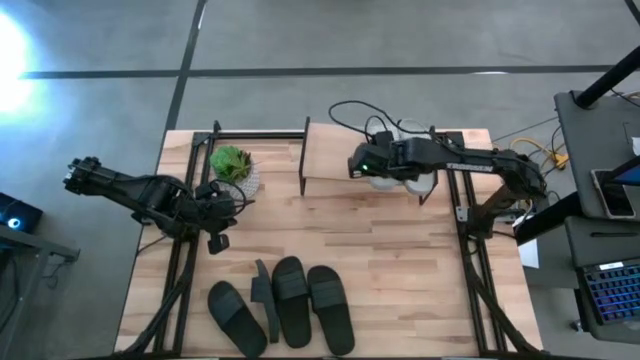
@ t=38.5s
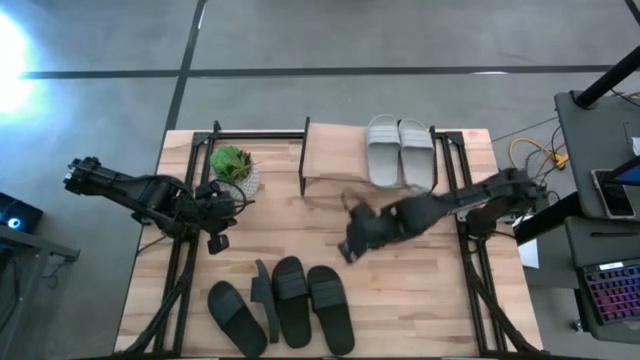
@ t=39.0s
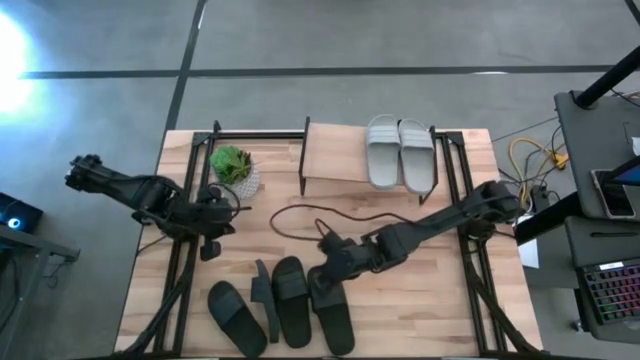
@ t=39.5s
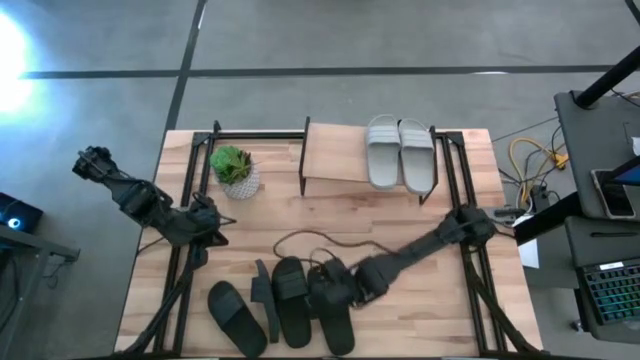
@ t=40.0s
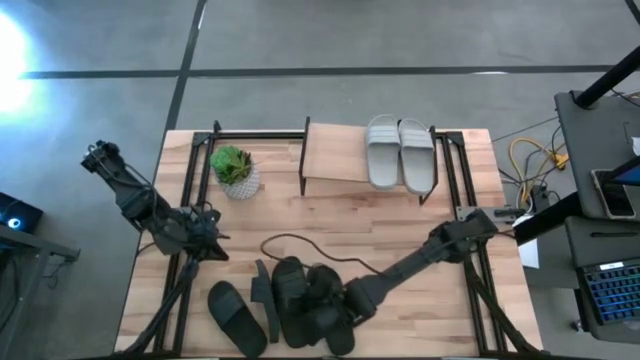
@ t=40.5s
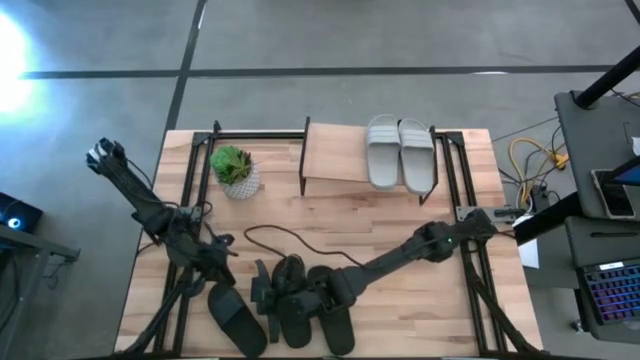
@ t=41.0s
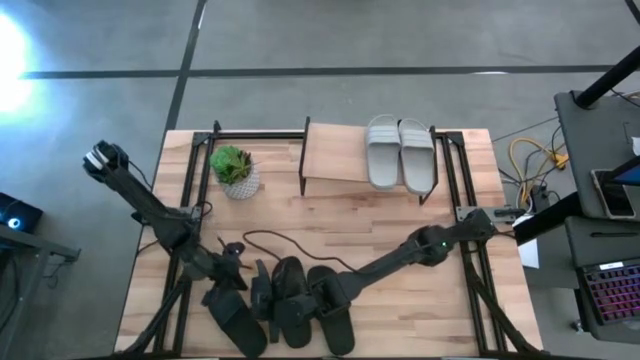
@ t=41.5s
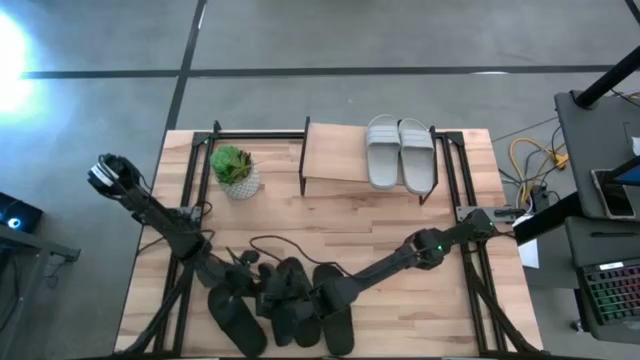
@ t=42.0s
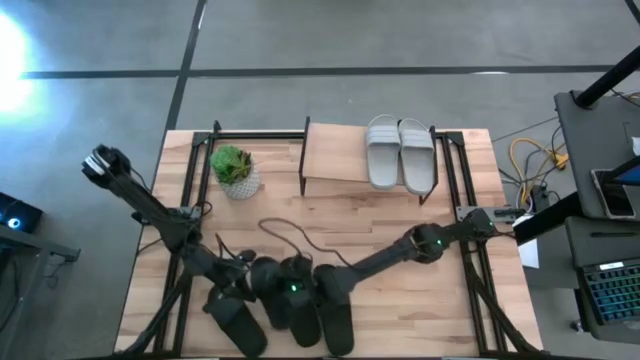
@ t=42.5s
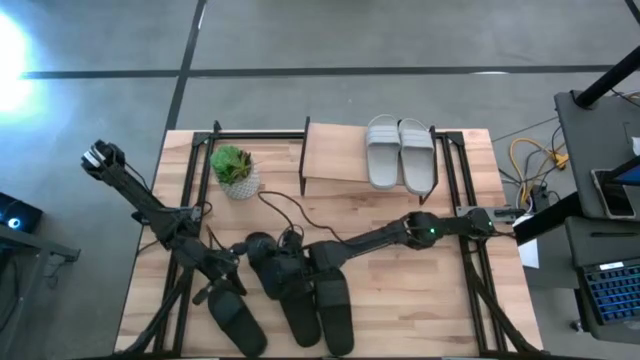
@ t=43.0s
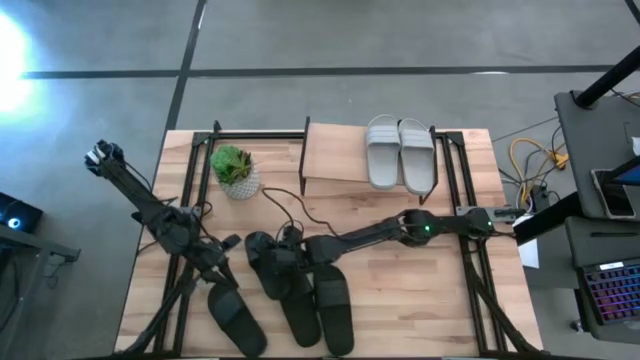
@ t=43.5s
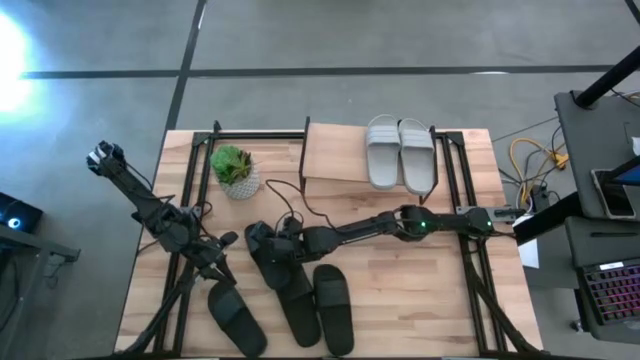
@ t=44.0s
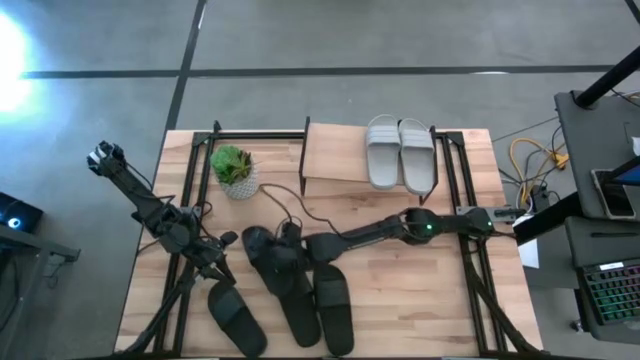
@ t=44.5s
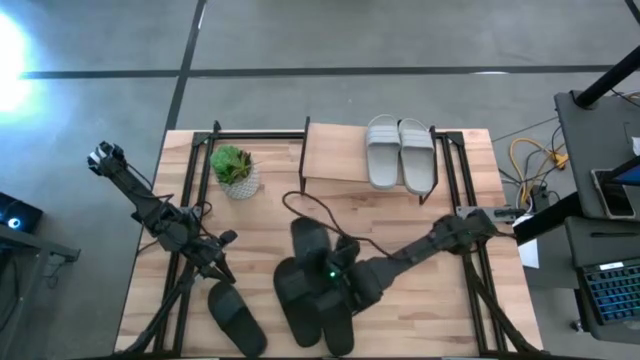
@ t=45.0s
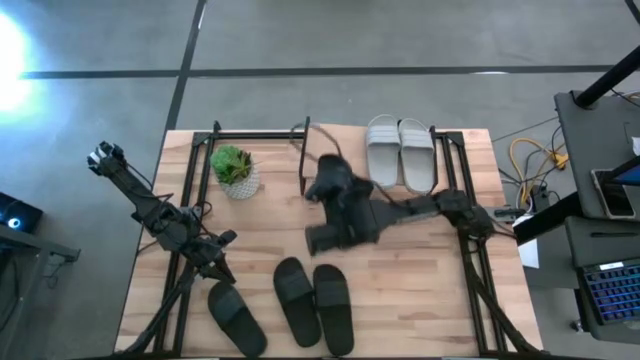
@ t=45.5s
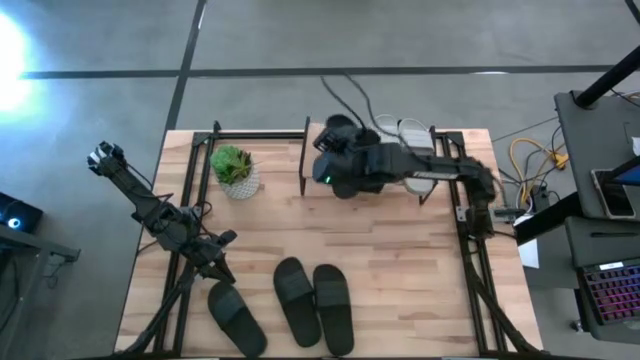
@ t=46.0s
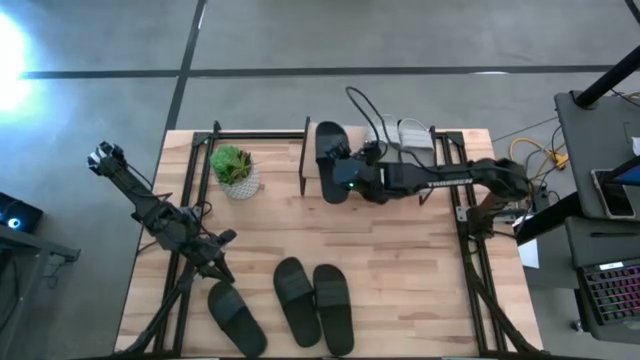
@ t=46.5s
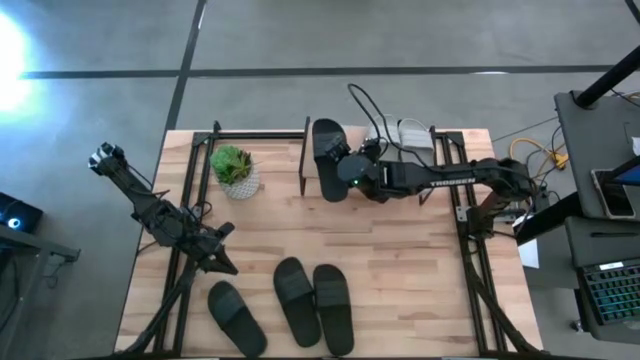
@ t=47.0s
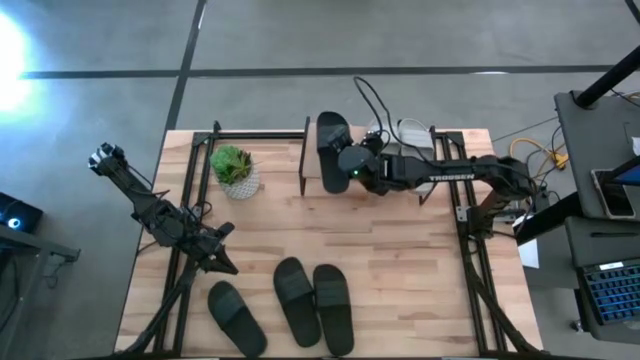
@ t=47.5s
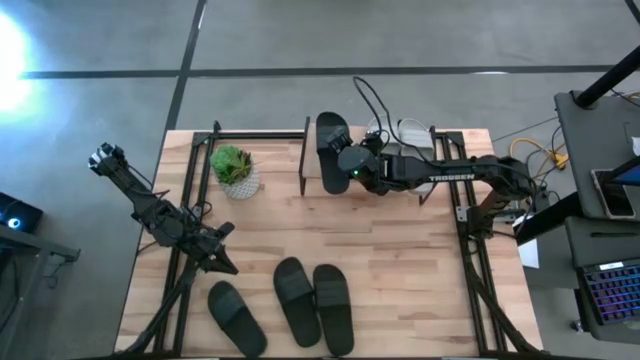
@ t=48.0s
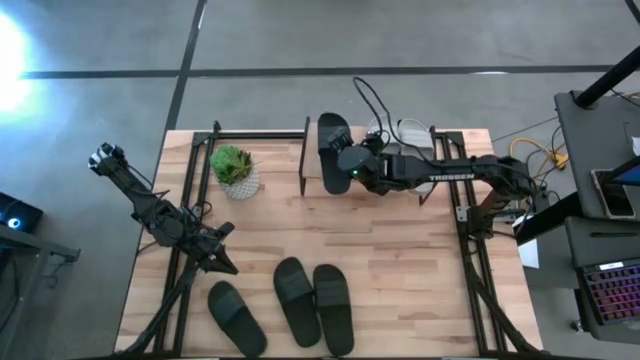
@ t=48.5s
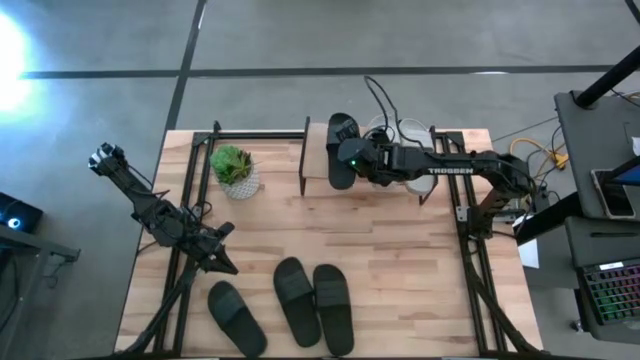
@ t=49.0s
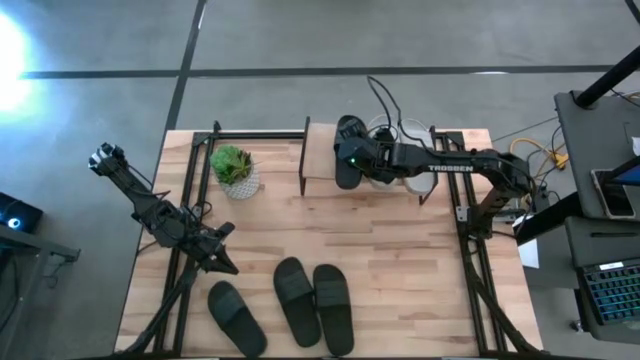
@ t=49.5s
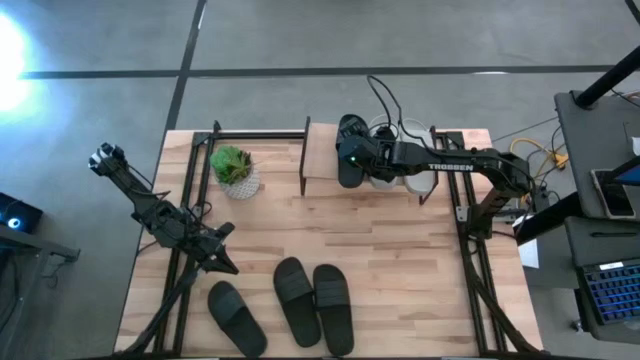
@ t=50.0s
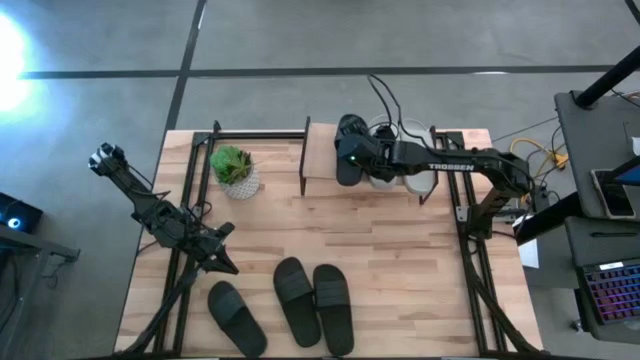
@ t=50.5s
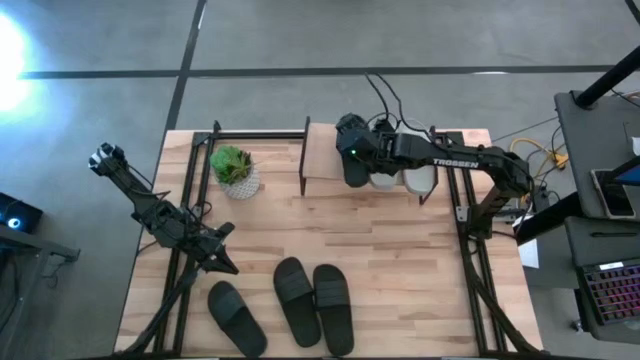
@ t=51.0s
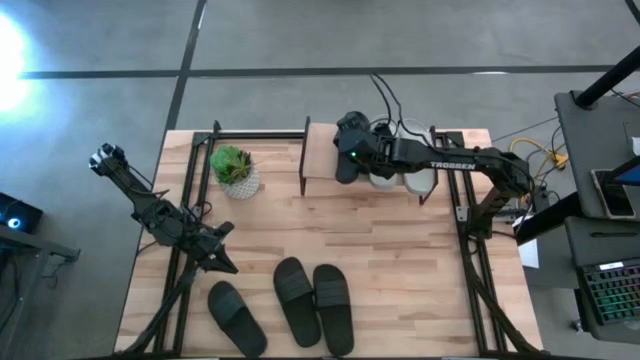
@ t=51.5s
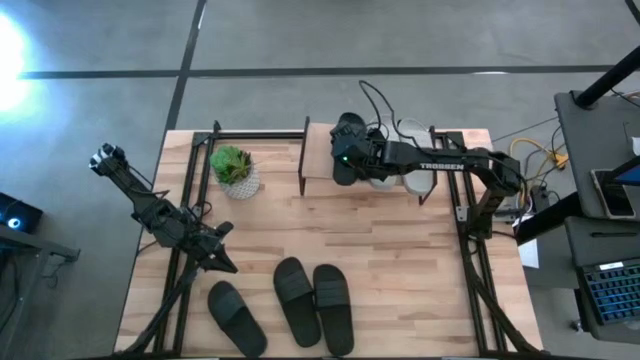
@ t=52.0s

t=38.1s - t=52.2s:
Task: Pick and place slides into the shelf
Put the black slipper under the shelf

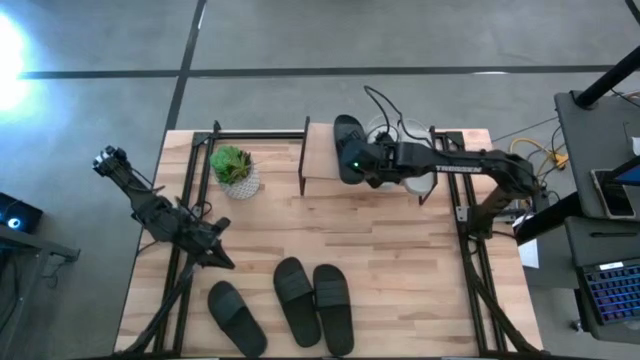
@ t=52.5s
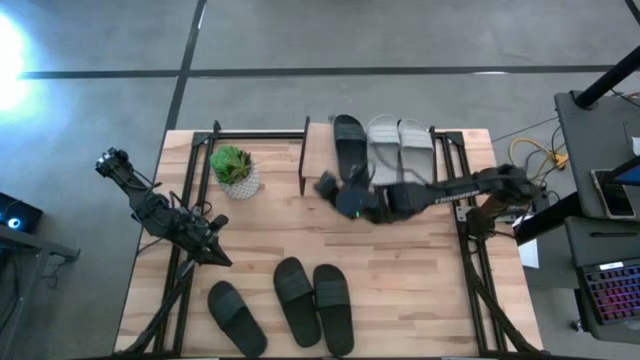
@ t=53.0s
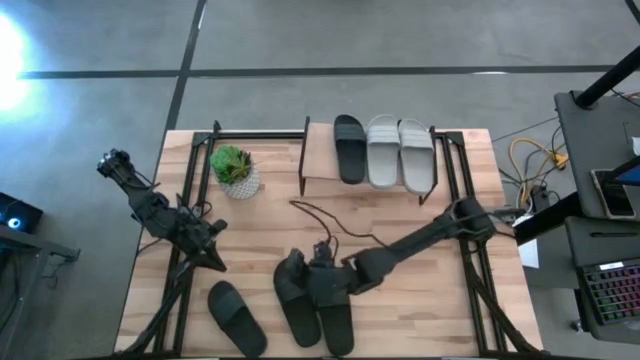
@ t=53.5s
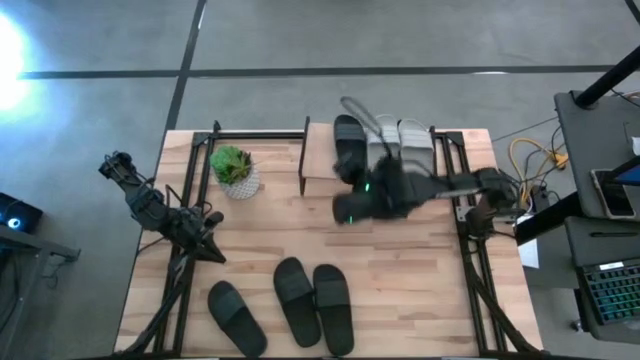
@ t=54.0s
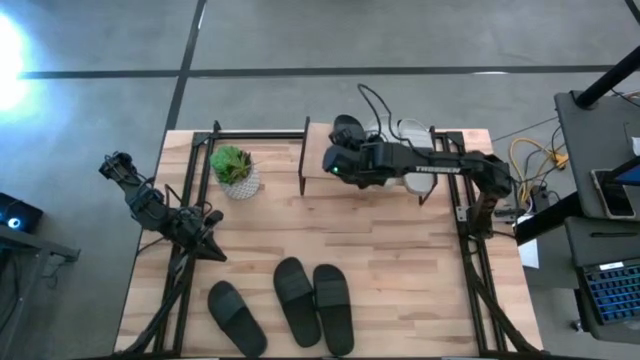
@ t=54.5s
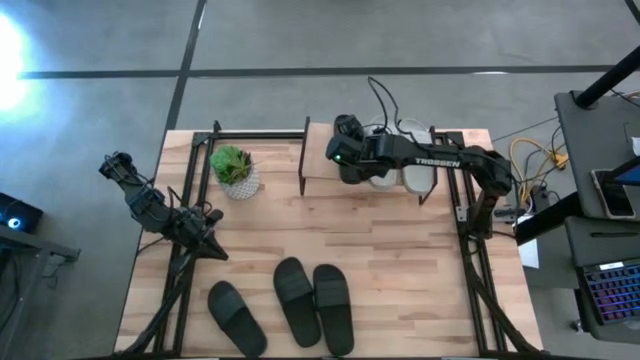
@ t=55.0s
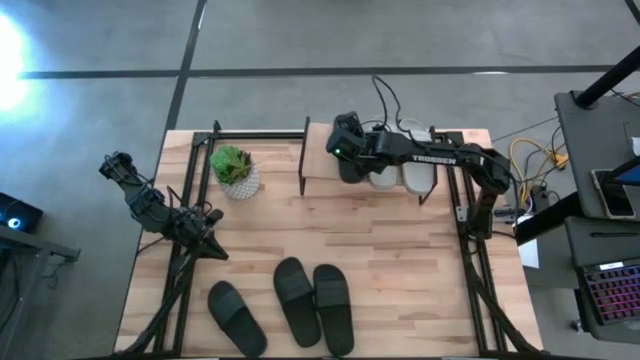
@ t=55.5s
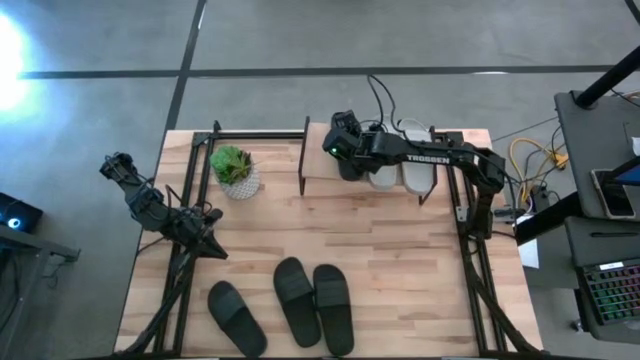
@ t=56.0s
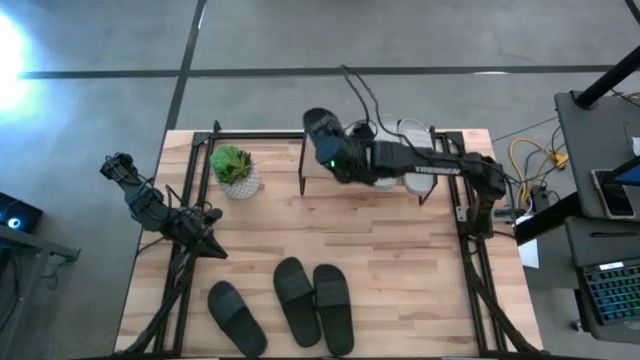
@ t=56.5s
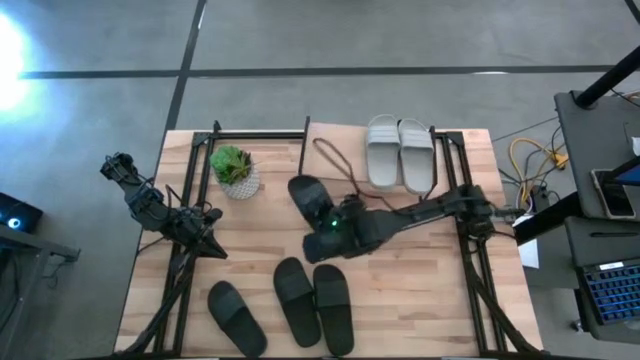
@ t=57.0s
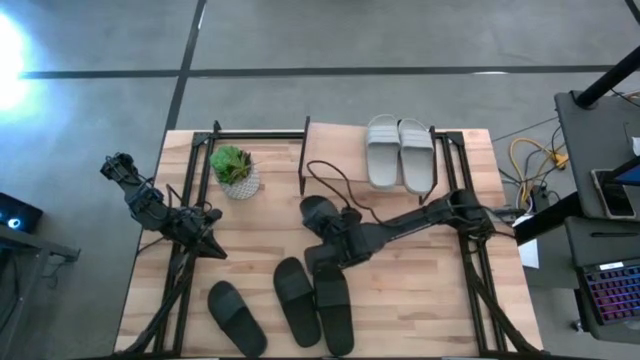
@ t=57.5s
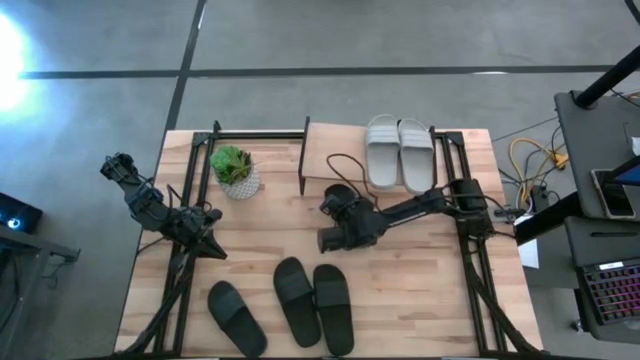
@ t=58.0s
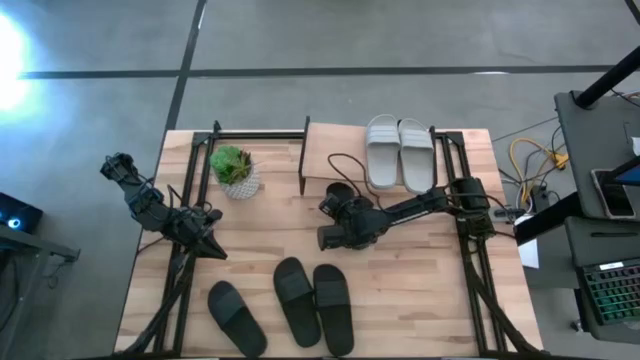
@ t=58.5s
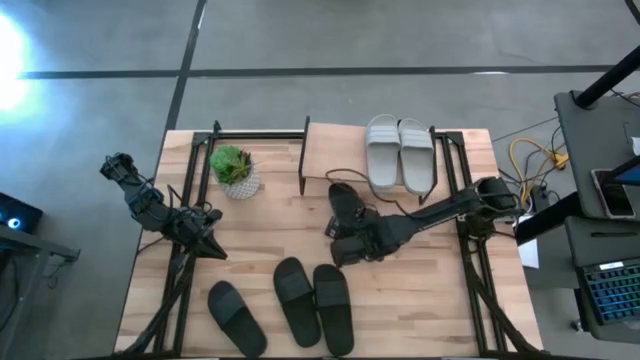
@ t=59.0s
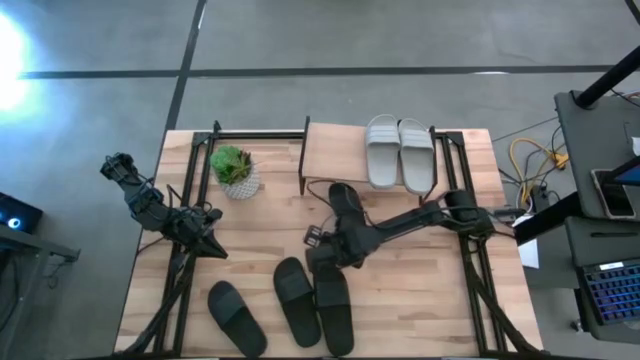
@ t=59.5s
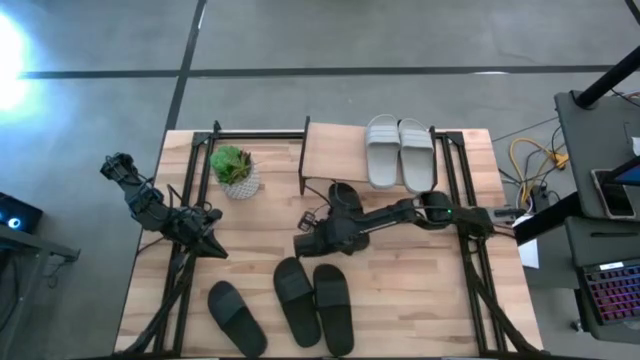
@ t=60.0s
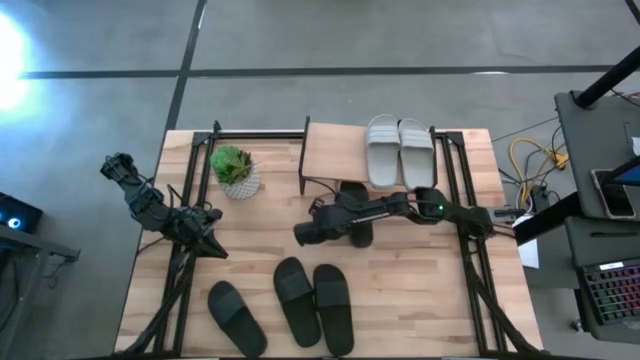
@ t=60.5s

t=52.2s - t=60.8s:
Put the black slipper under the shelf
